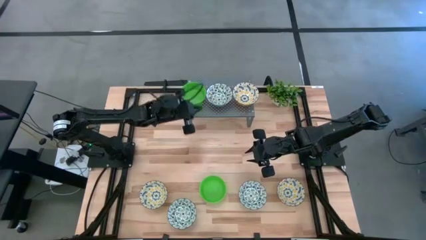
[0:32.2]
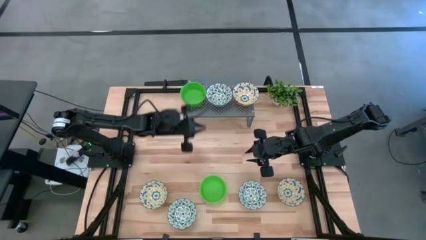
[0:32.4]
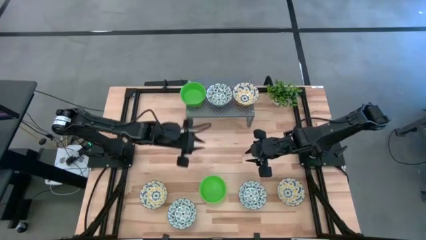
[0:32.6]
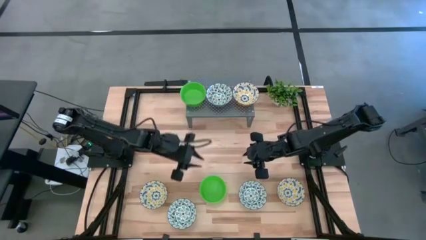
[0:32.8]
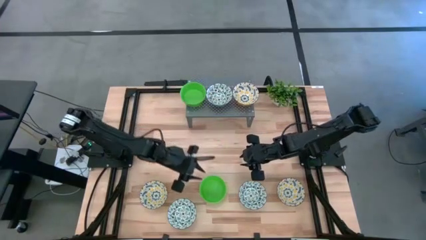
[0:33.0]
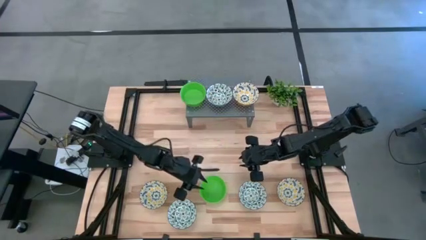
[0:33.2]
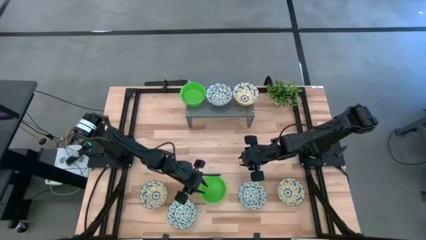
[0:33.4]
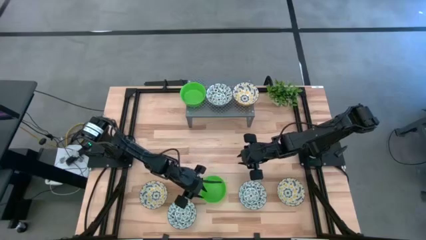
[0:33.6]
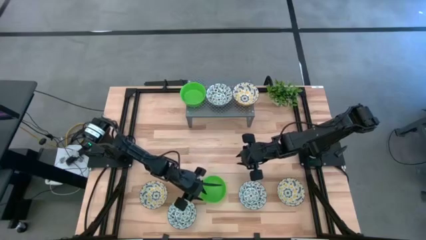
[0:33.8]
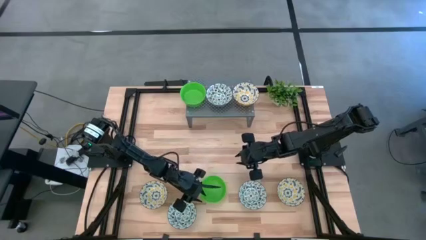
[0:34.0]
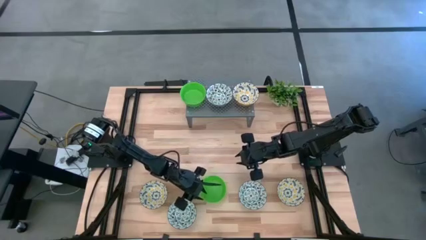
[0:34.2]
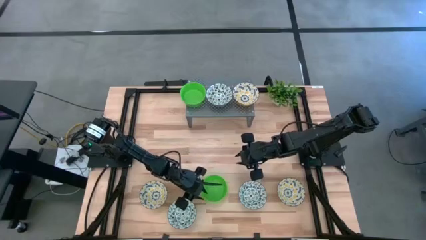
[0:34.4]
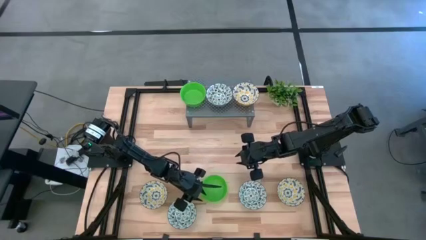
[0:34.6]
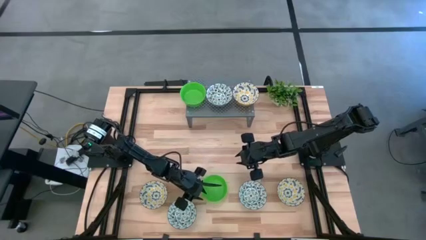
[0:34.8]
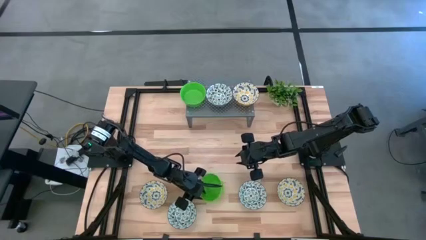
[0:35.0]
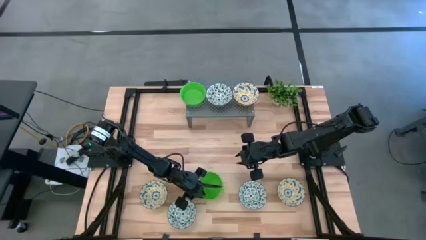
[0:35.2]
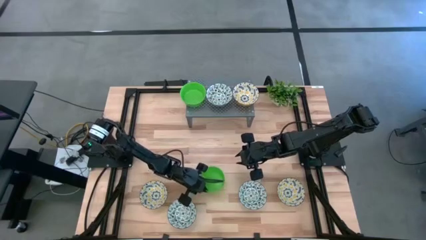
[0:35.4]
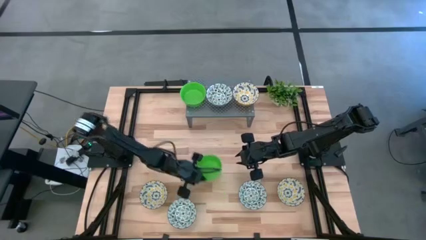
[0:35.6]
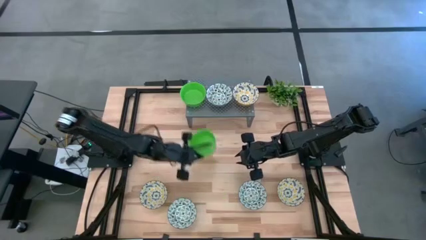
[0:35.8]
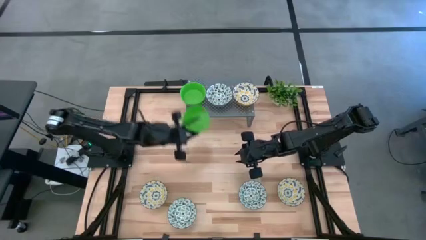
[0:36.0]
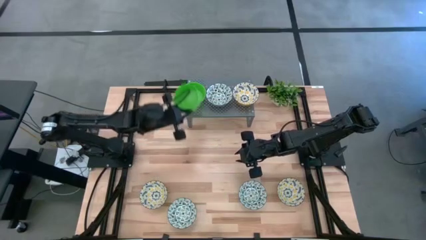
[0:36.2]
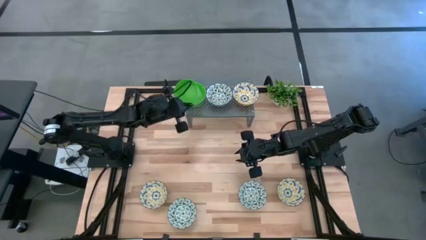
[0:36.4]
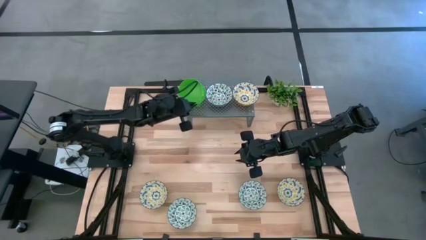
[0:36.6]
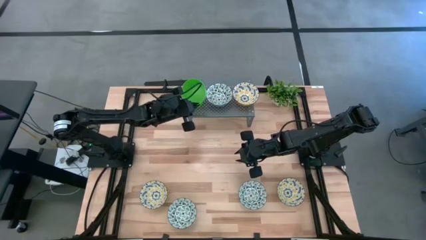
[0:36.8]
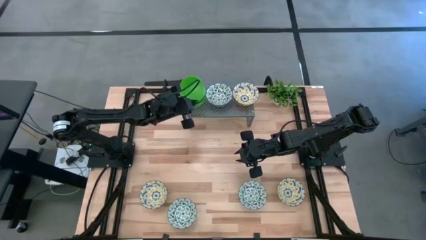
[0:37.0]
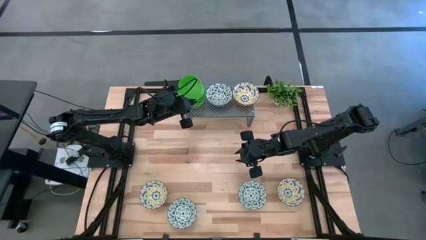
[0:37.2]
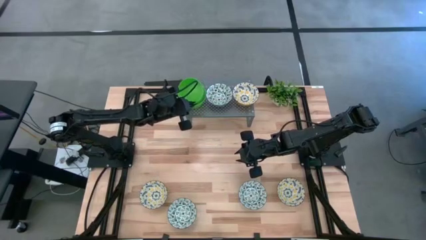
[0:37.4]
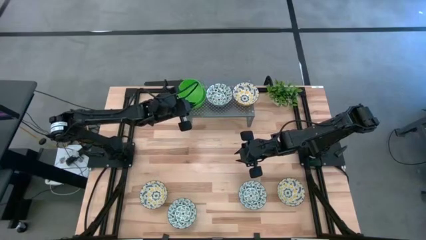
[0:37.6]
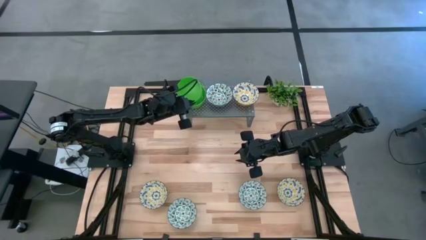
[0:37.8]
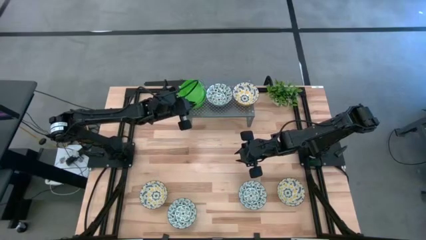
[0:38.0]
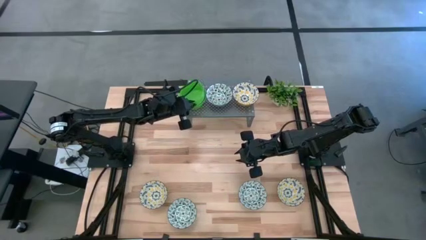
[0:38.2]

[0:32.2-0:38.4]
Task: Pick & Place Mini bowls
Stack the green bowl on top of the green bowl on the shelf

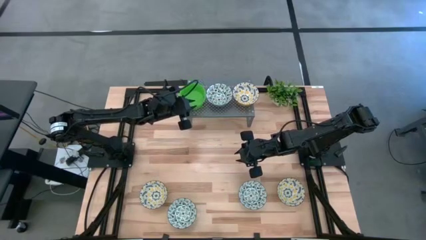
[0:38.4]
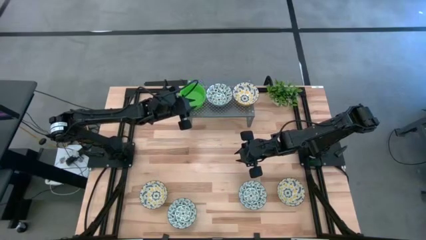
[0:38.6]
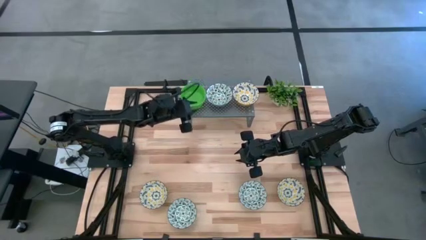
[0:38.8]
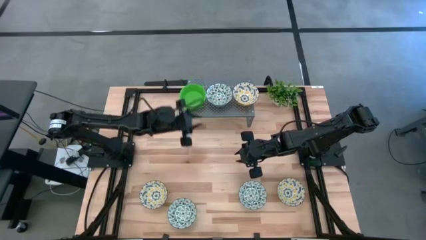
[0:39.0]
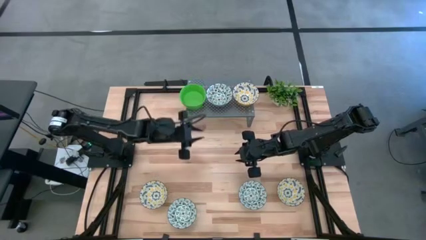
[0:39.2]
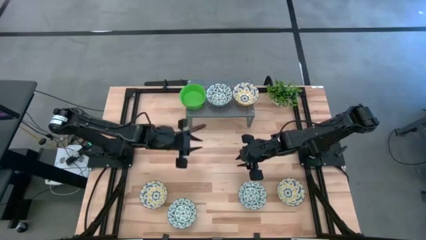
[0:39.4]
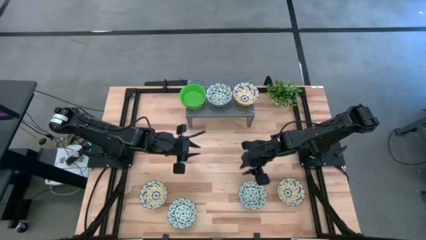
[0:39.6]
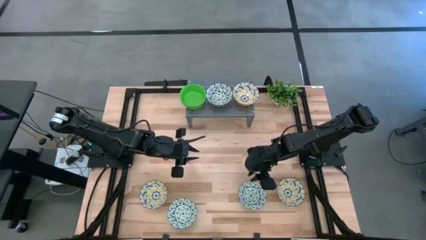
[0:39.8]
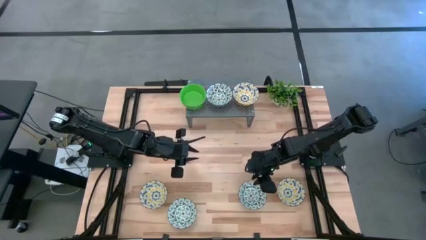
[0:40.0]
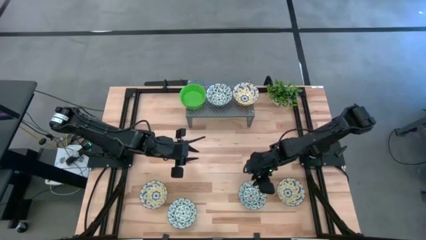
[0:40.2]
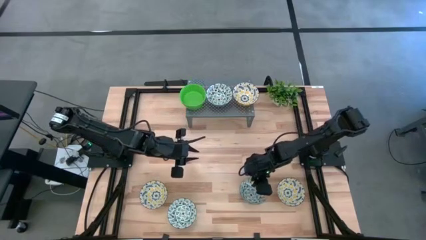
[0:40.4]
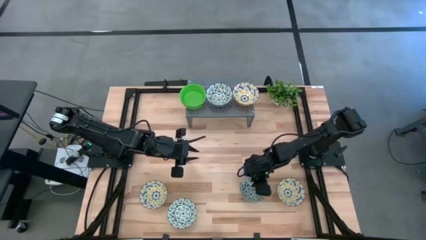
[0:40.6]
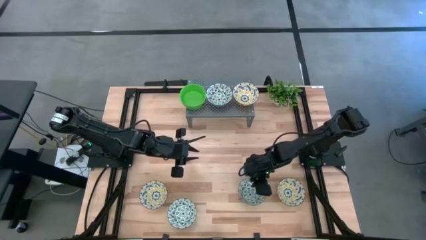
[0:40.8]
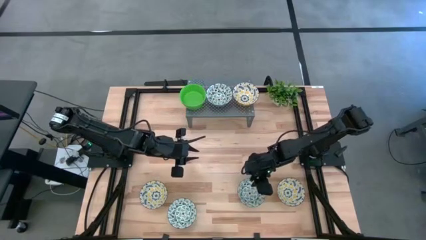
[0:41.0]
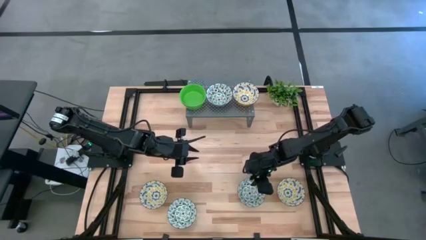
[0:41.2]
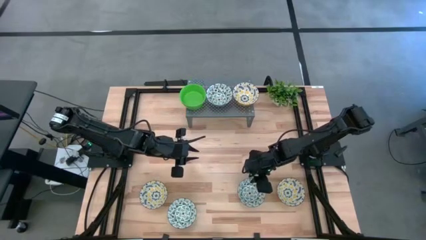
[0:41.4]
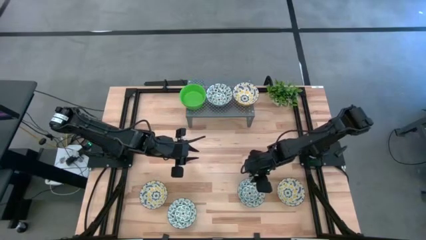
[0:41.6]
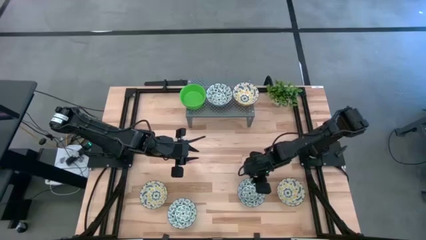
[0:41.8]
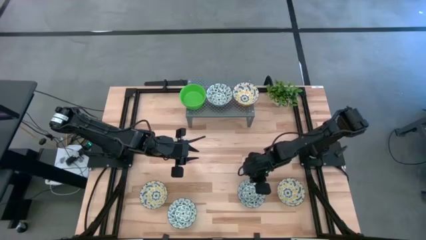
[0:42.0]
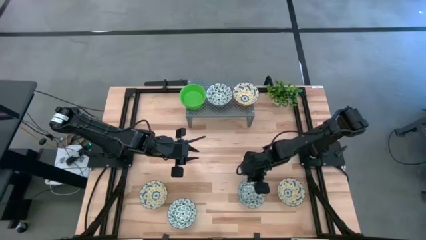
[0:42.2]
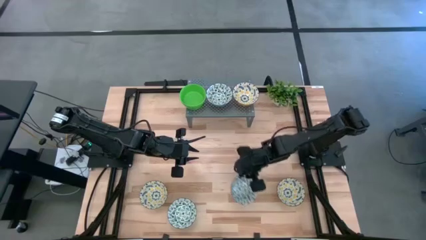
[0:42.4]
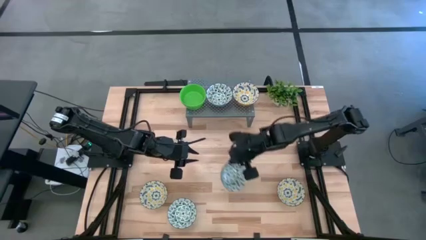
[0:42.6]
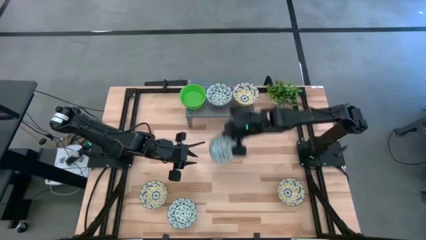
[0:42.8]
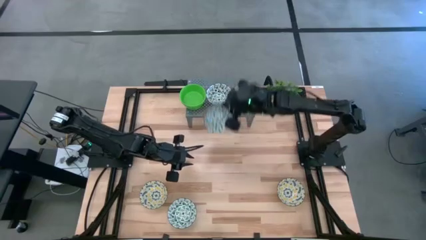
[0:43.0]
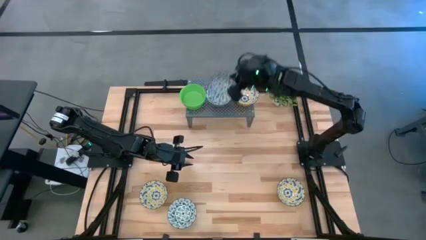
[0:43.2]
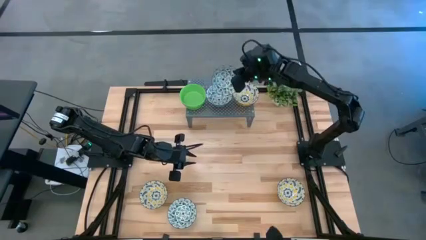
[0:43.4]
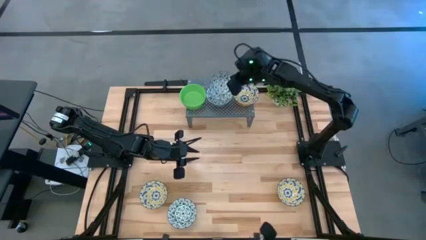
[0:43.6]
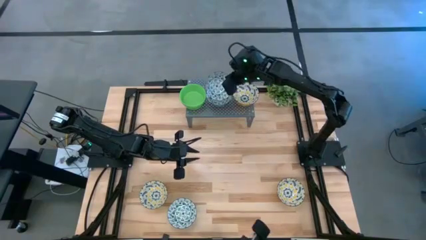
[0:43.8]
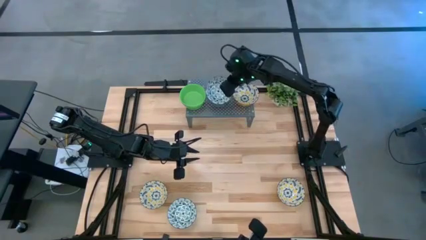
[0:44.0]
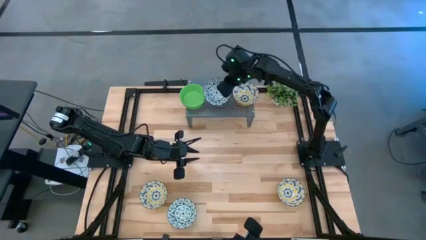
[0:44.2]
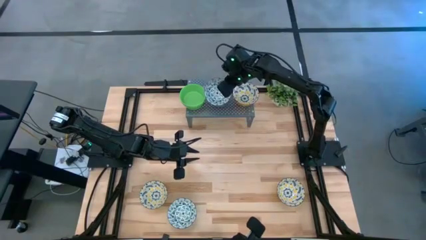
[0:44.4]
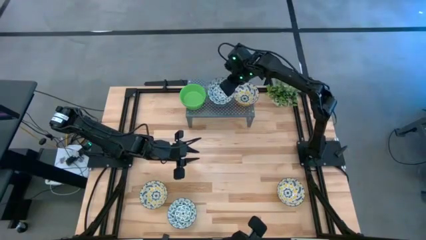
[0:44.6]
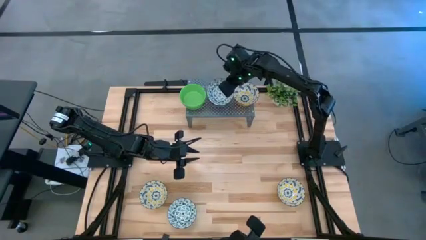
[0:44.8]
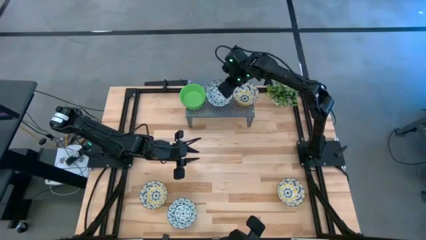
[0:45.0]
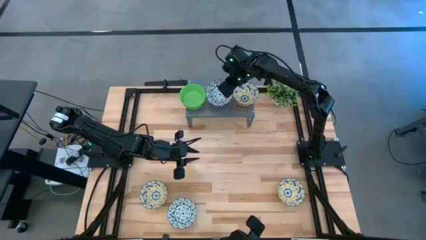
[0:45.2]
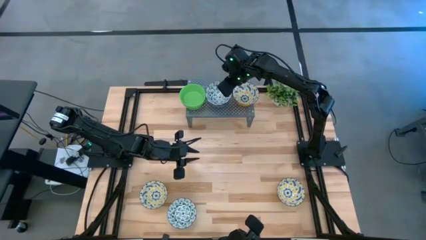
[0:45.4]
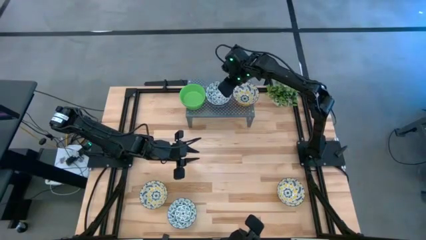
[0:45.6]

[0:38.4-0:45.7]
Stack the right green patterned bowl on top of the green patterned bowl on the shelf

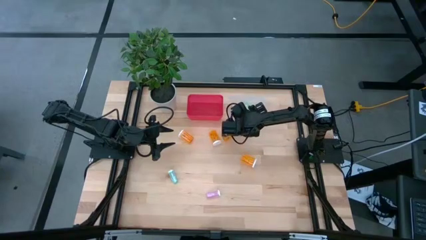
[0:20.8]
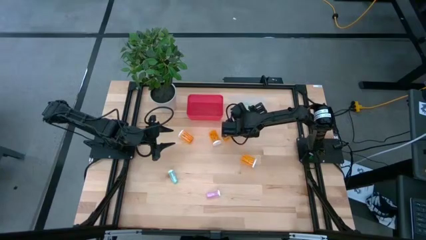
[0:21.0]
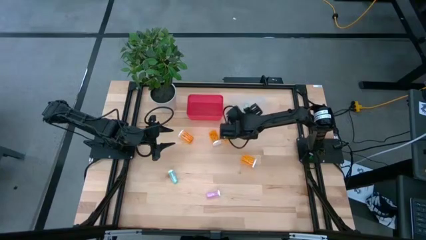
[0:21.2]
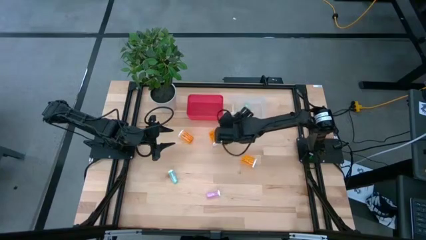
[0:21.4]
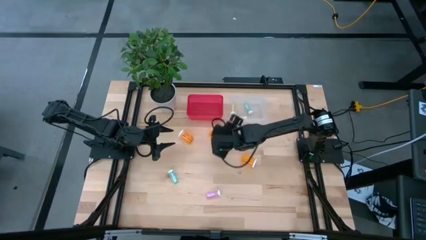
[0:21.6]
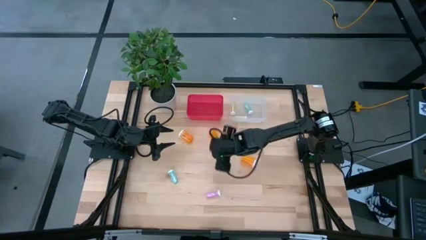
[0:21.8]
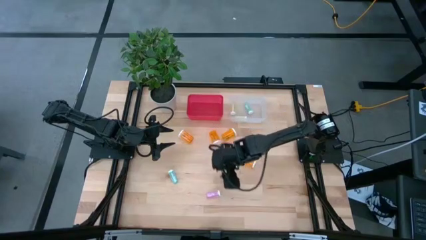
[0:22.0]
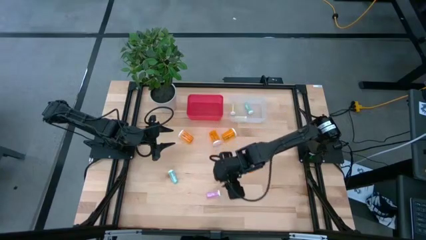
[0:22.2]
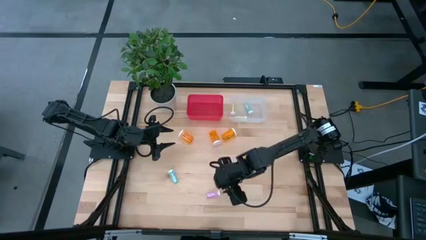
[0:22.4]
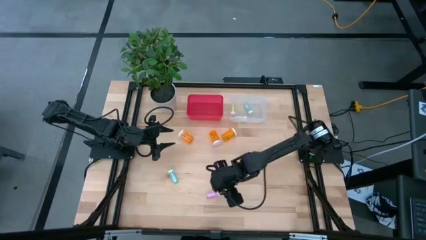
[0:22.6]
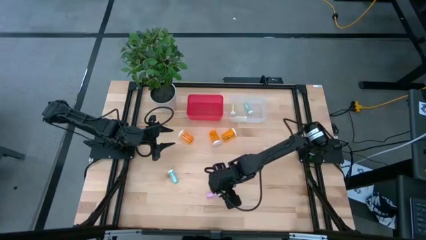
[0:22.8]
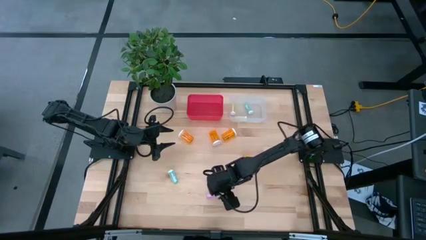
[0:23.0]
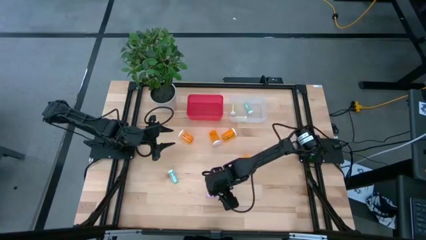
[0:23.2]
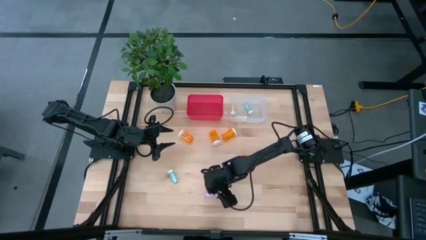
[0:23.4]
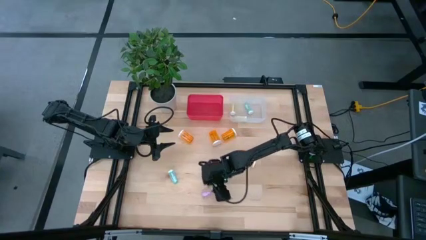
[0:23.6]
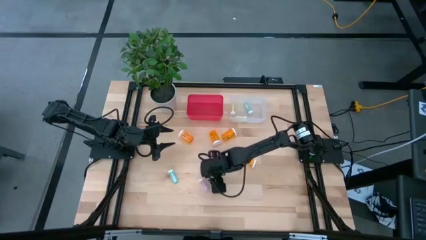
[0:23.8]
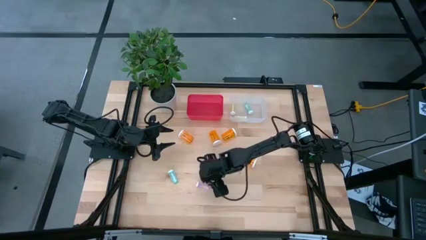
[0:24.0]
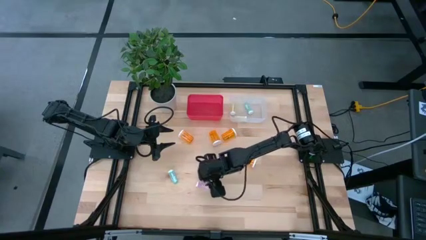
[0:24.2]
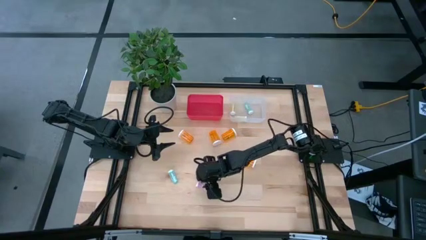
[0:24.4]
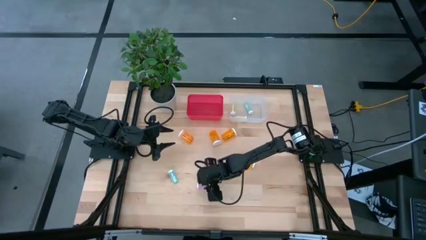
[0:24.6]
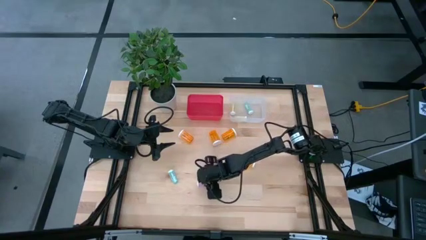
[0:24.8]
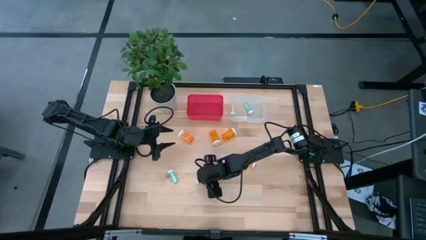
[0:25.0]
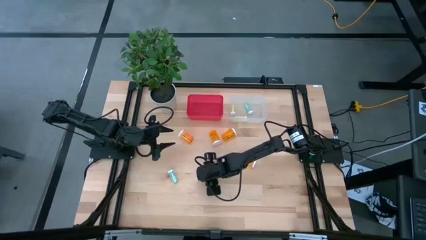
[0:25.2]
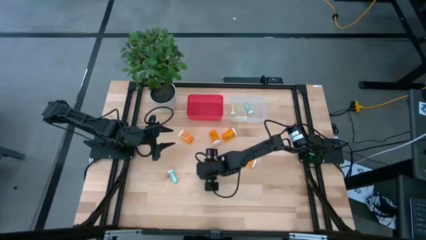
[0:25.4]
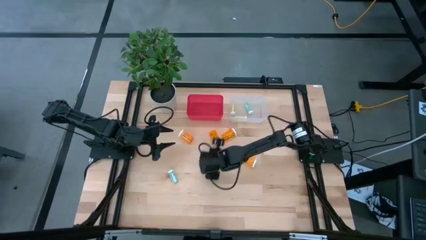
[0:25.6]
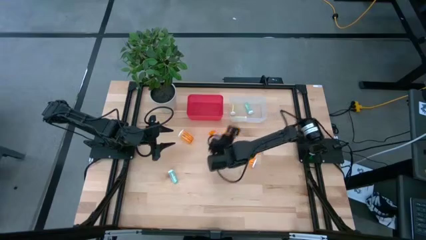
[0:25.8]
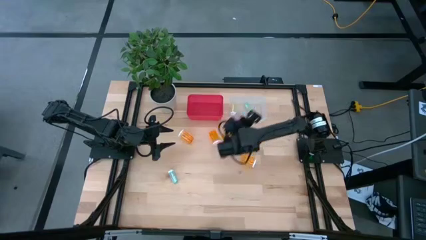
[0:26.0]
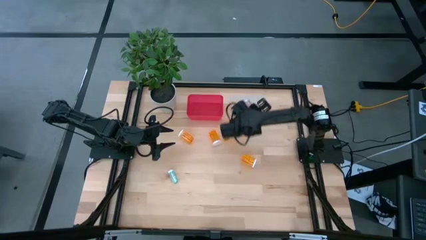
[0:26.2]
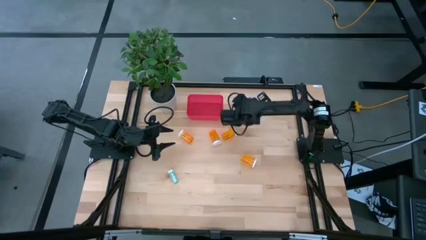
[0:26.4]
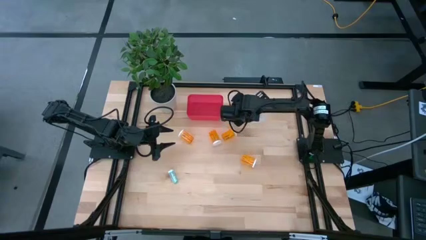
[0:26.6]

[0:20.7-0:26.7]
Task: Pick and place medicine bottles into bin by pill shape (circle, oval)
Put the pink tablet bottle into the transparent bin
